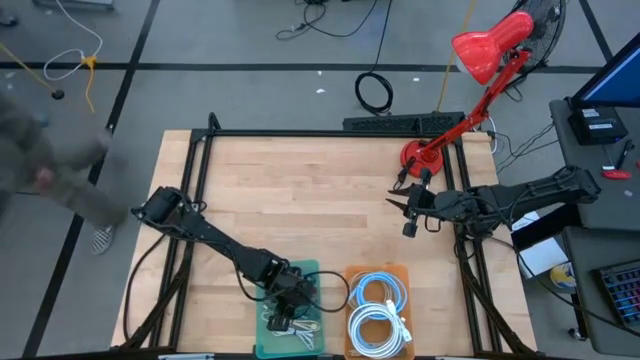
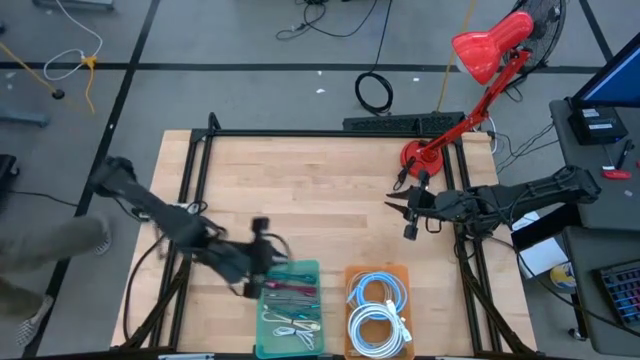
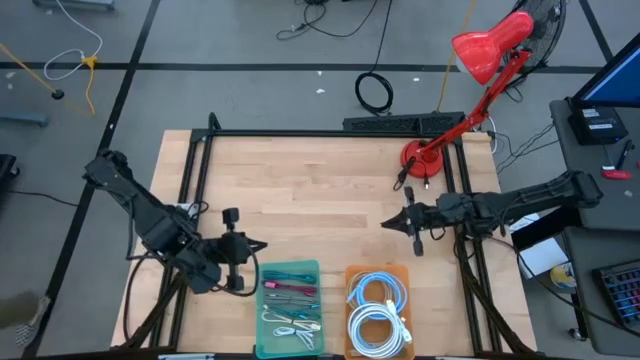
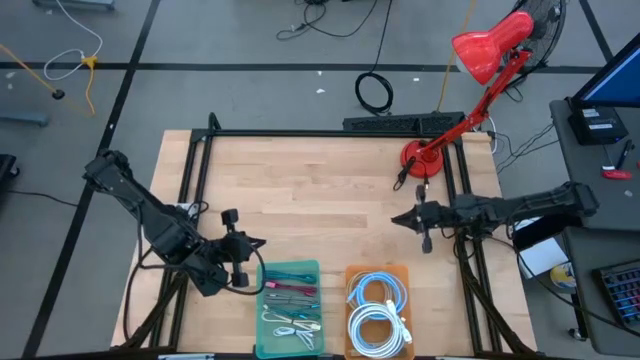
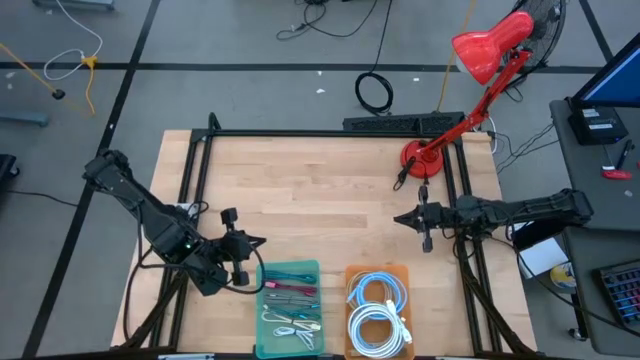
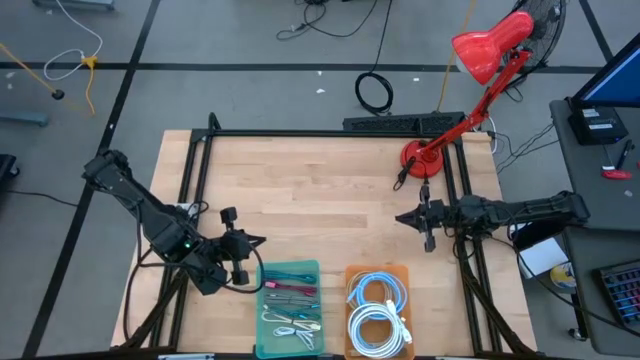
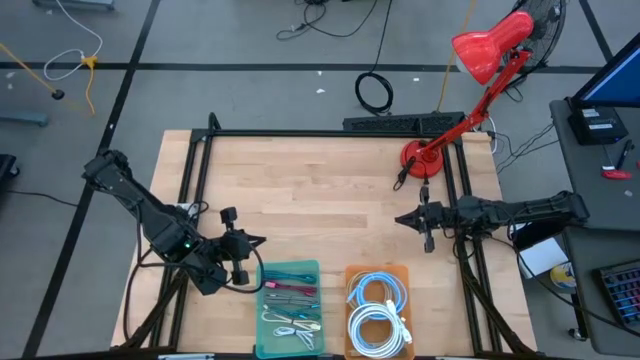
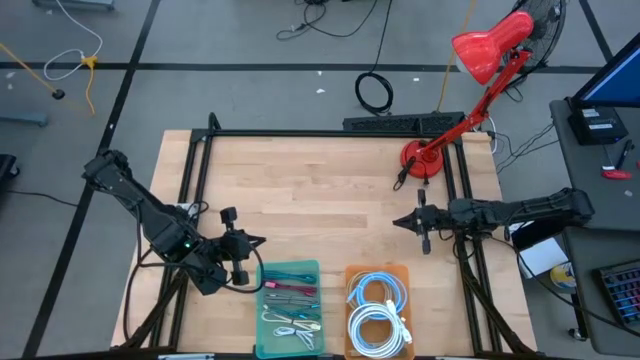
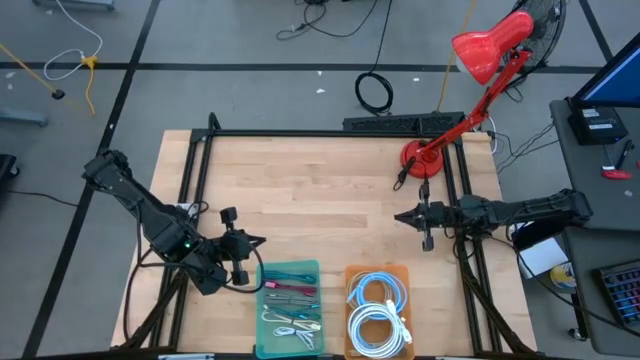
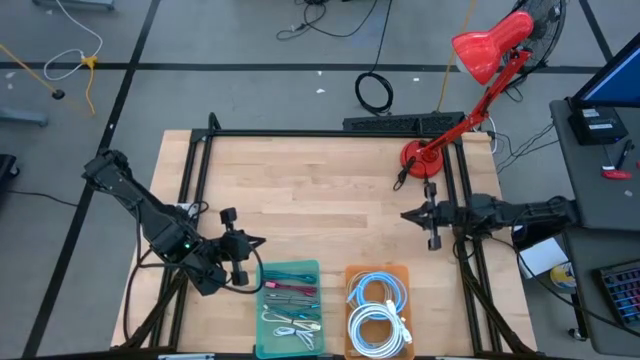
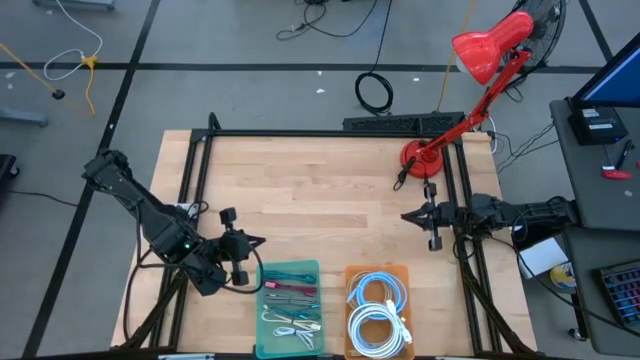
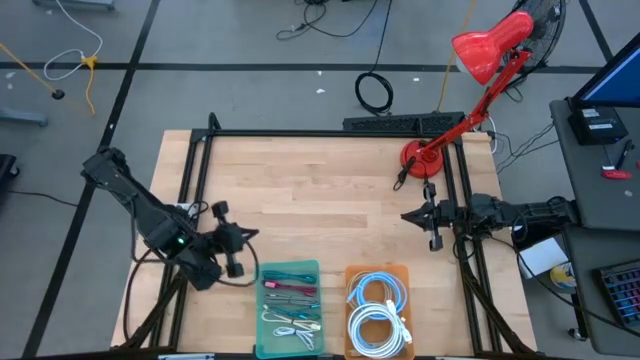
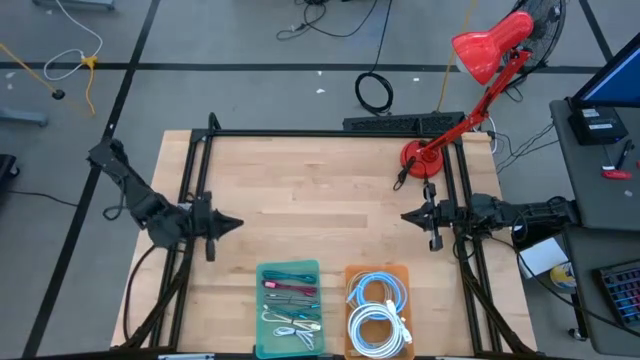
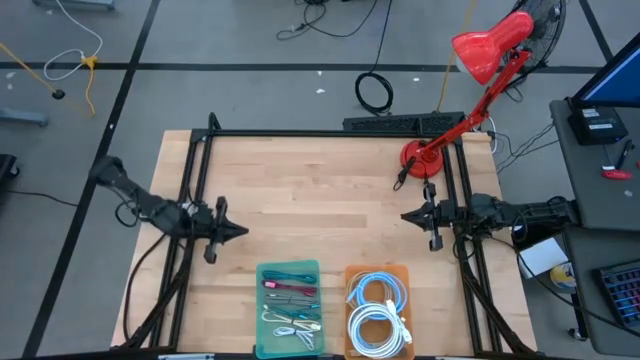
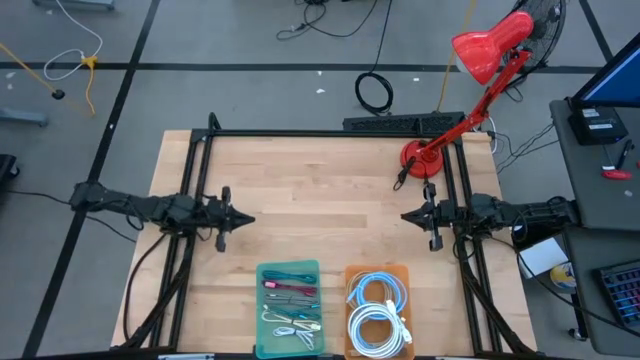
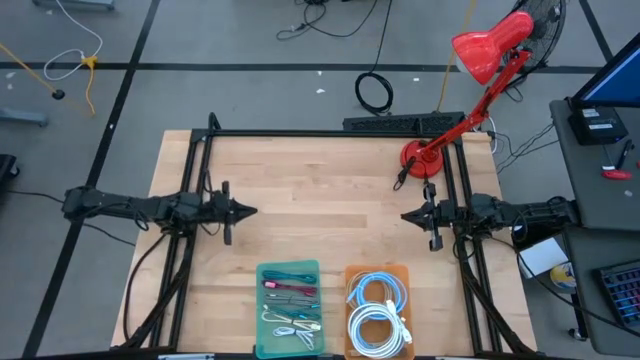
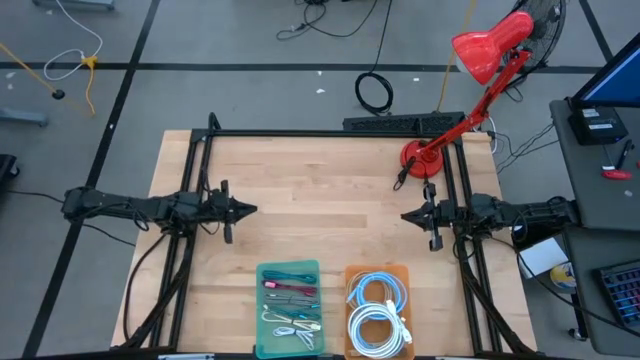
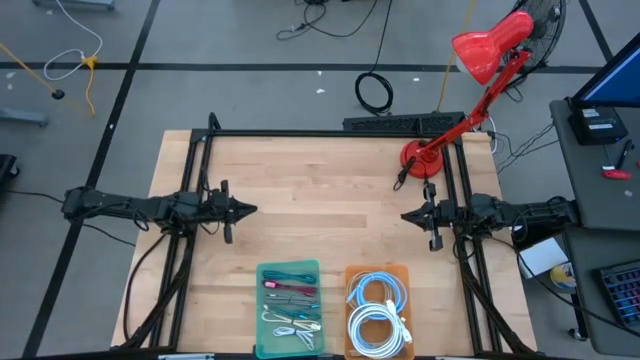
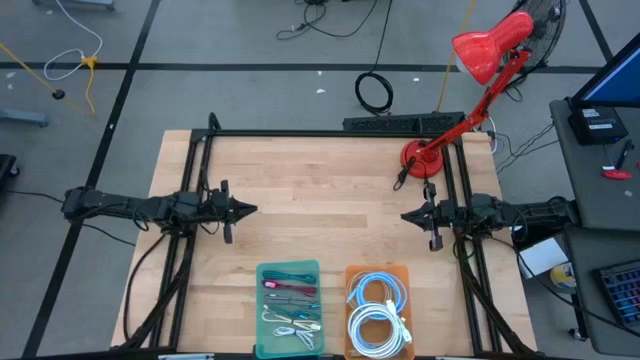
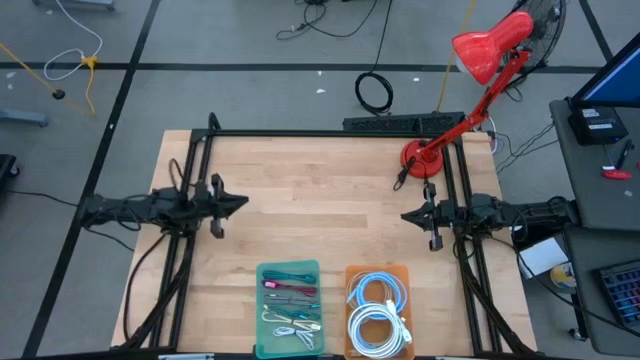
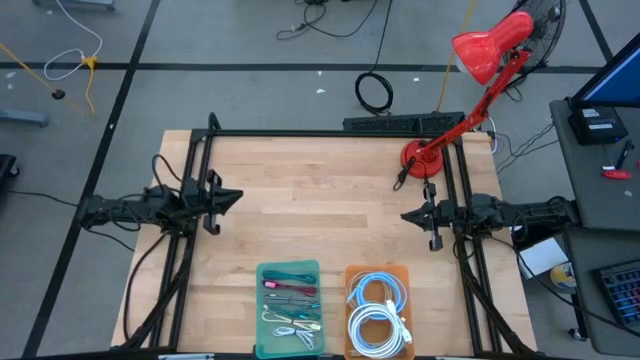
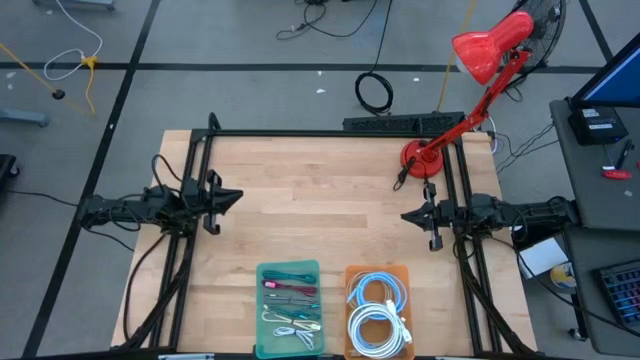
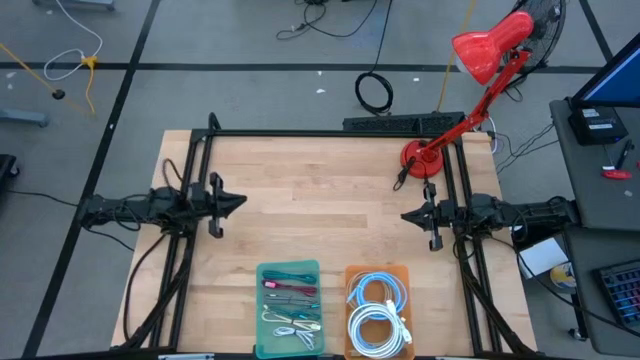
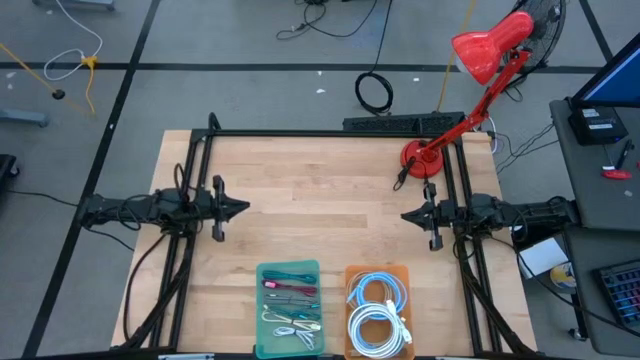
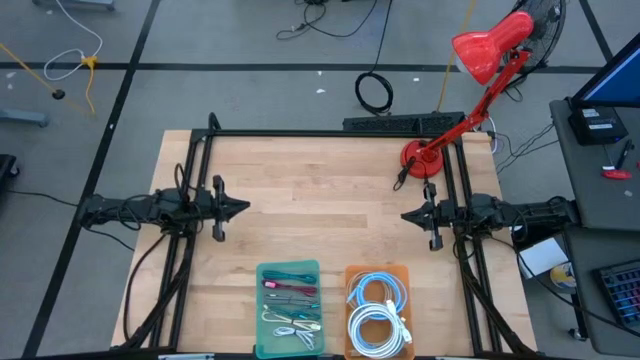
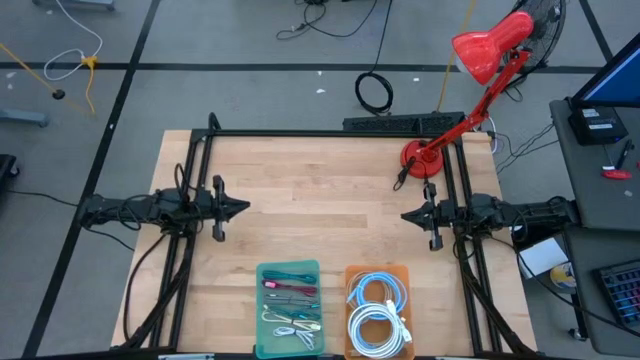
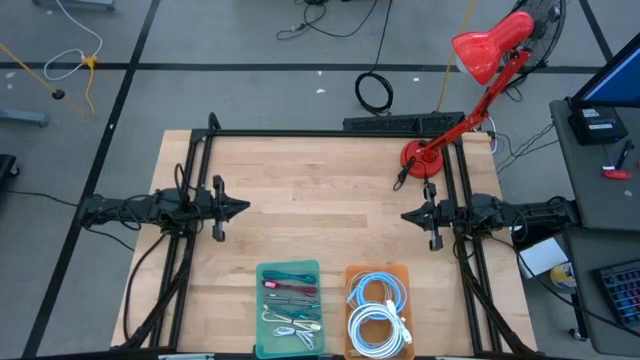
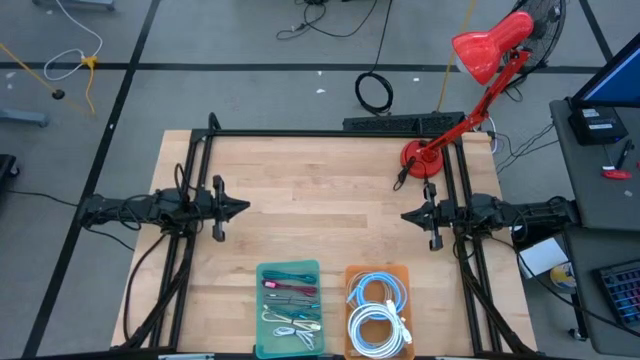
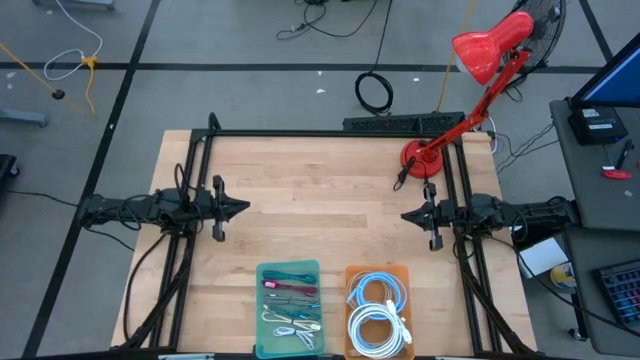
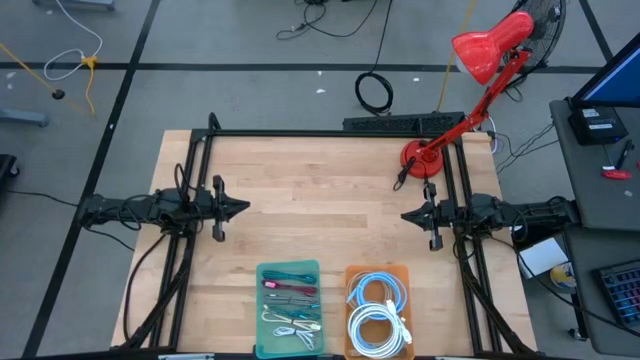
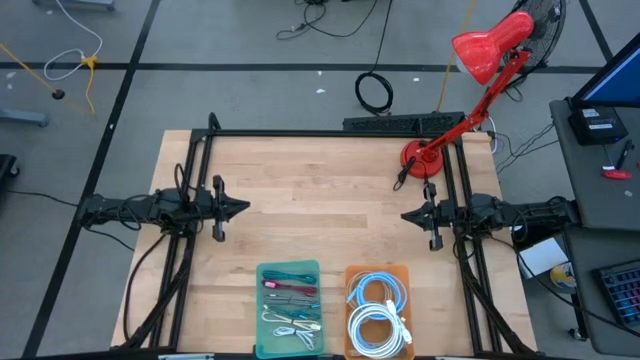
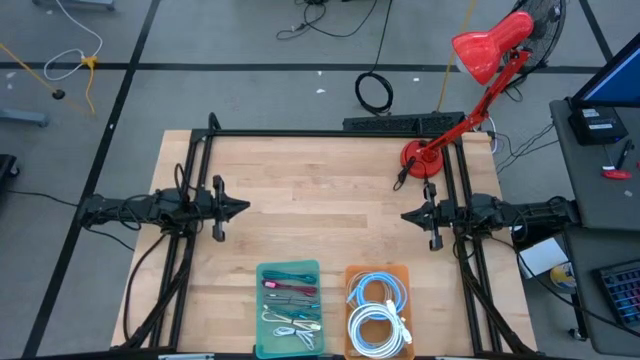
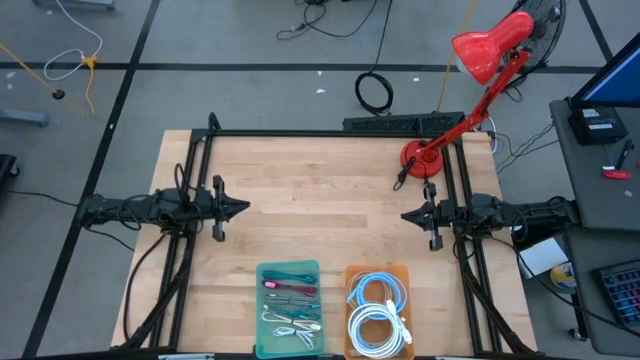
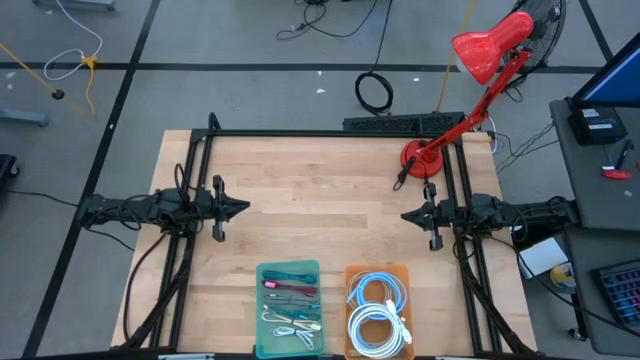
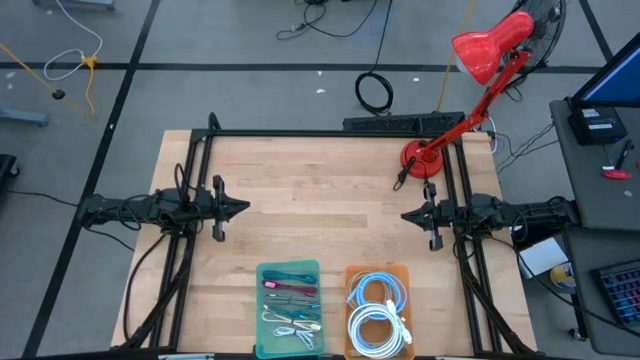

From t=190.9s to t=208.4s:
Task: Pick & Place USB Port
Return to Home Position

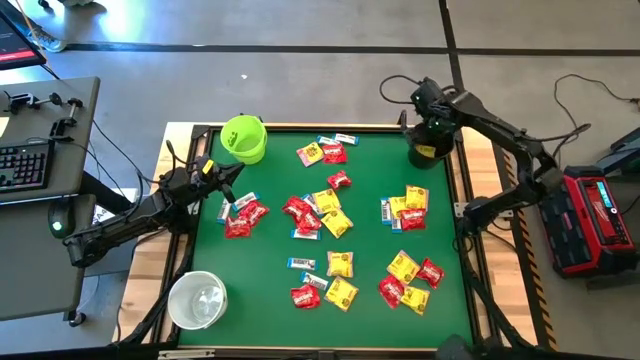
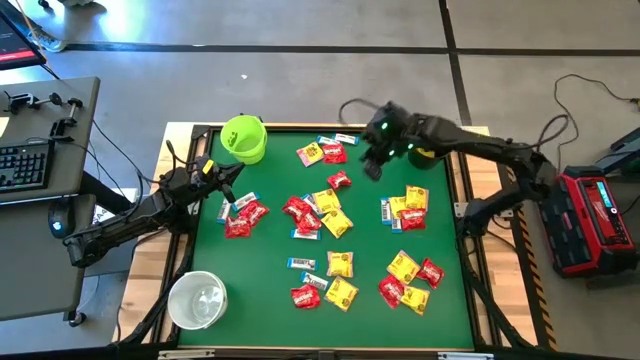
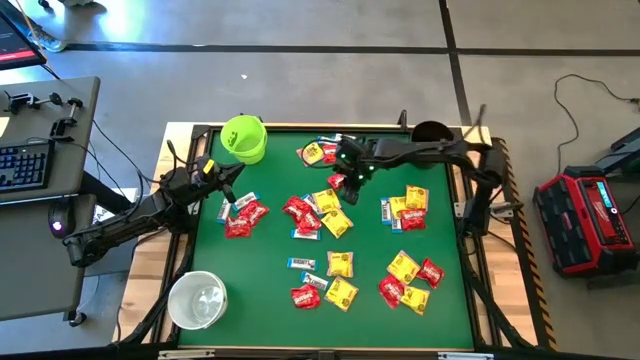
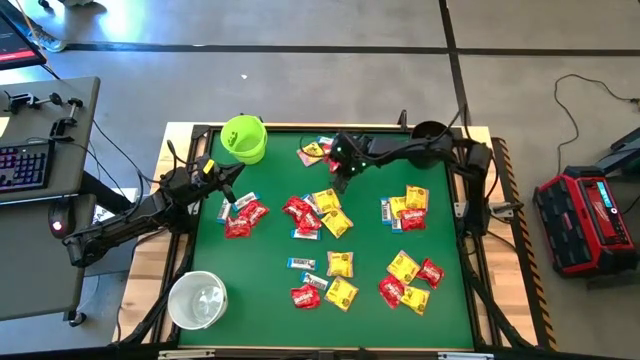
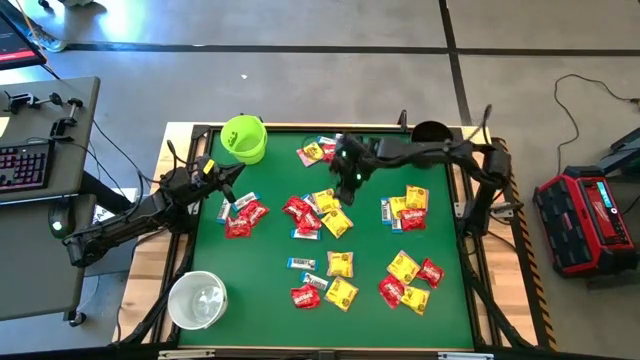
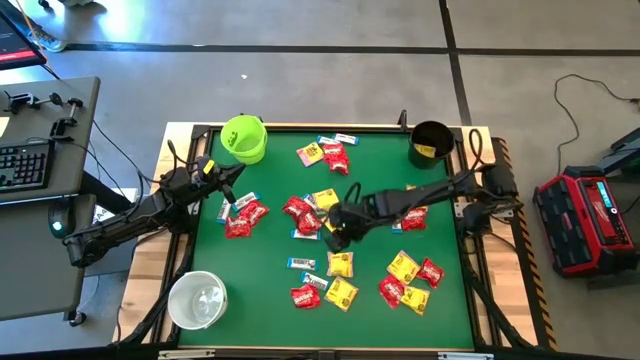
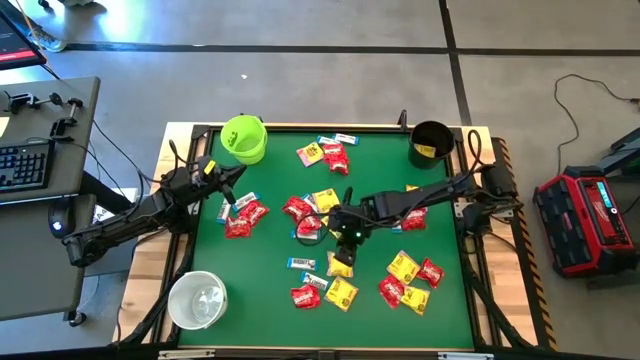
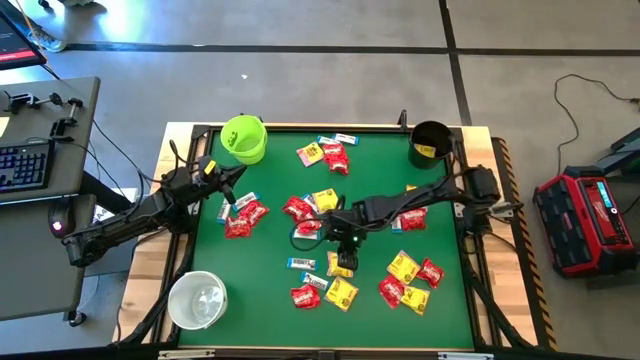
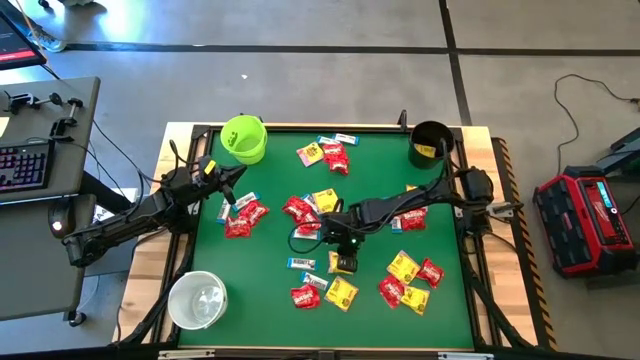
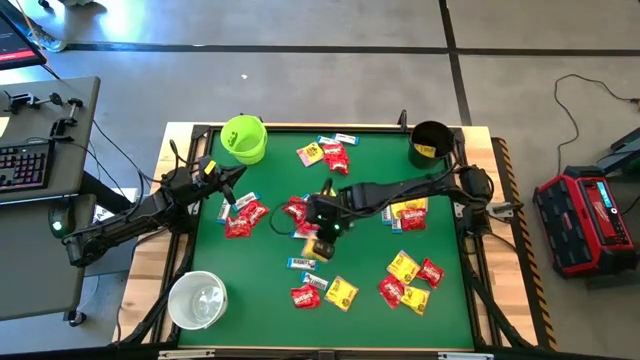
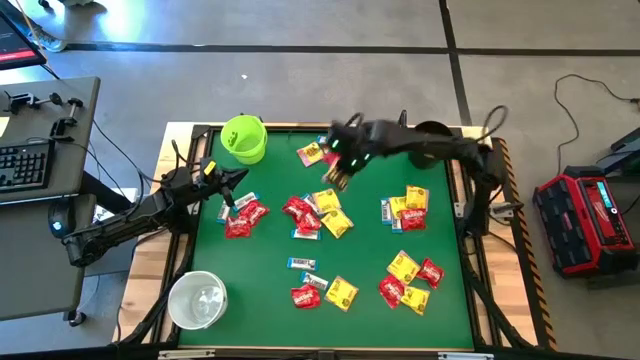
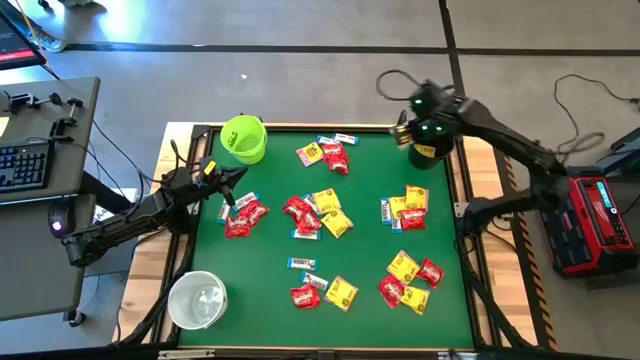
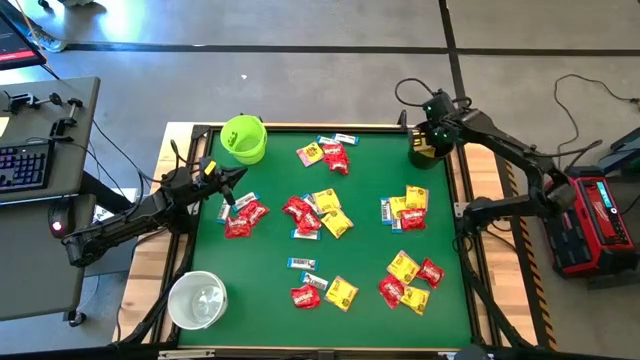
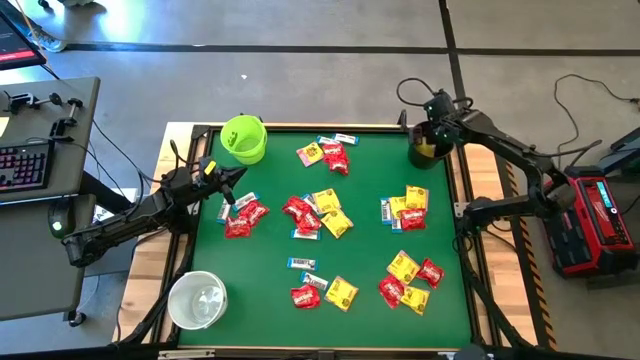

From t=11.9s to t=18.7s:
Task: Sort candy by brand, put in halloween buckets
Put the yellow candy into the black bucket
